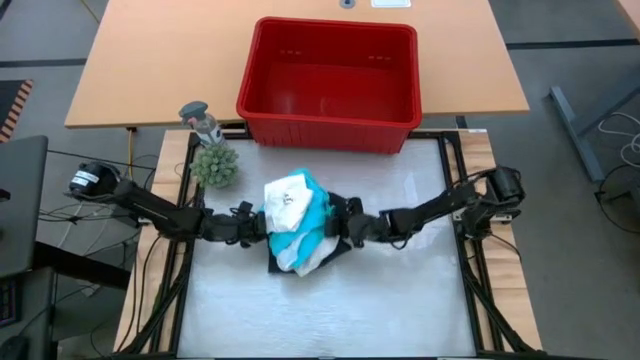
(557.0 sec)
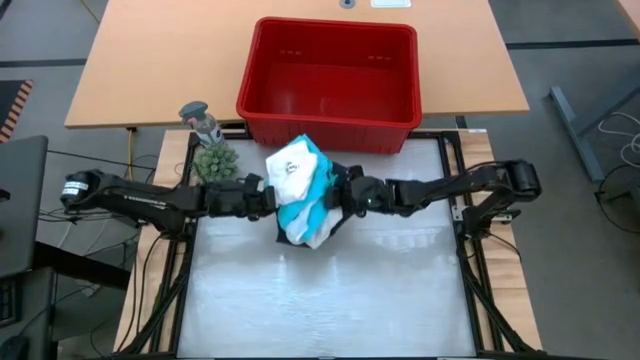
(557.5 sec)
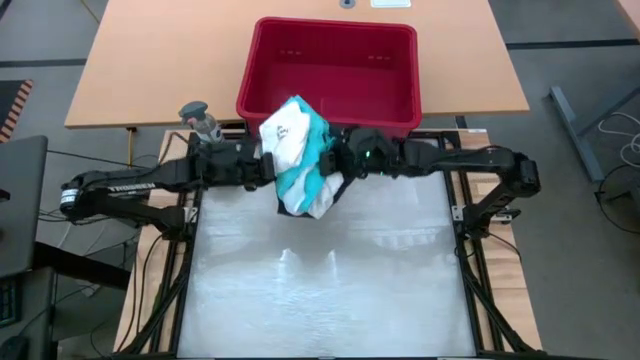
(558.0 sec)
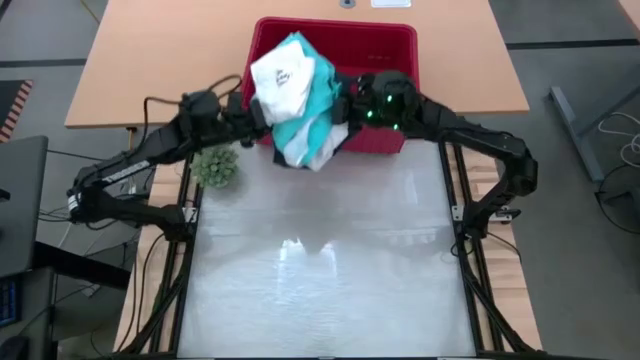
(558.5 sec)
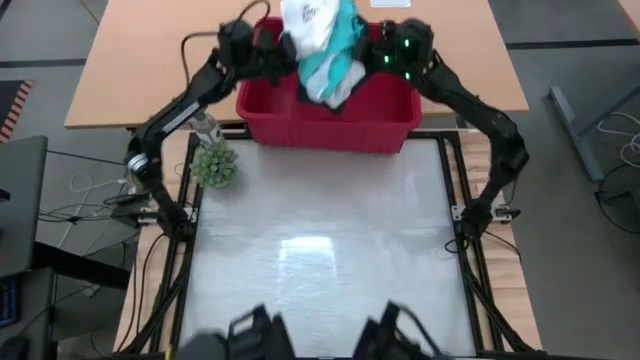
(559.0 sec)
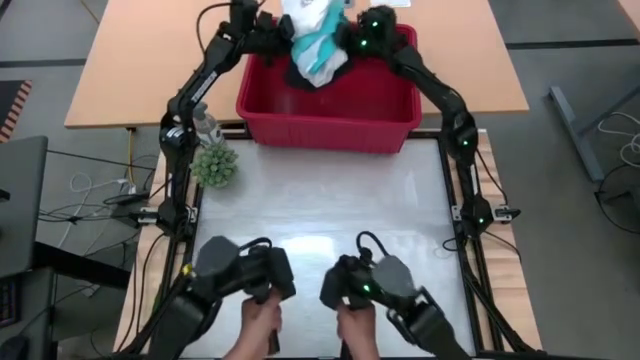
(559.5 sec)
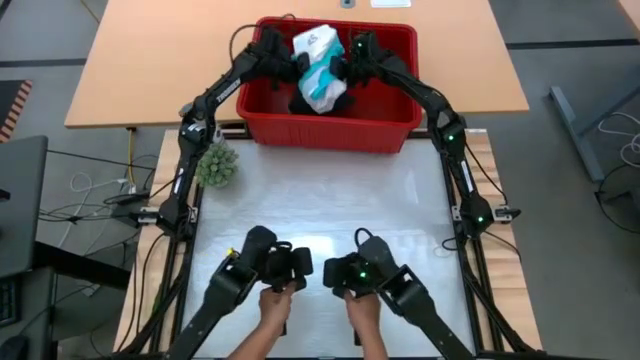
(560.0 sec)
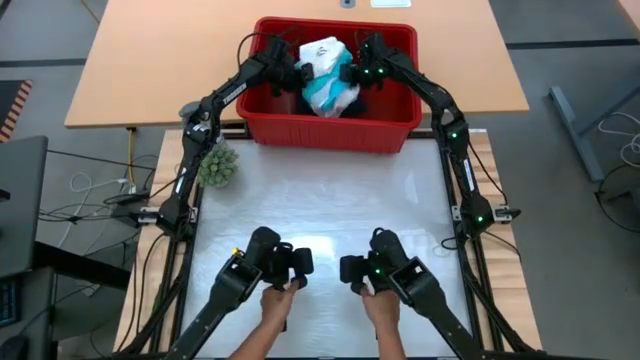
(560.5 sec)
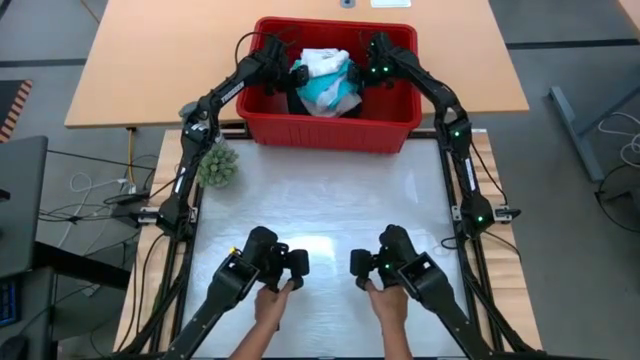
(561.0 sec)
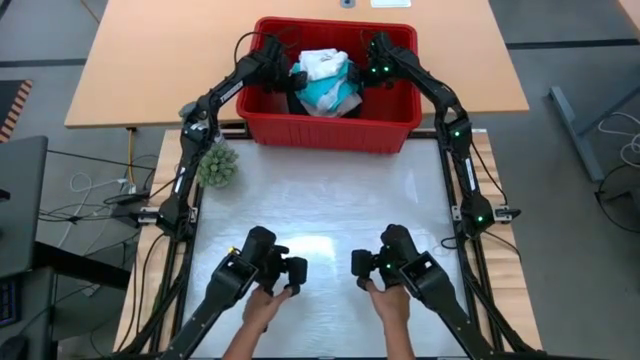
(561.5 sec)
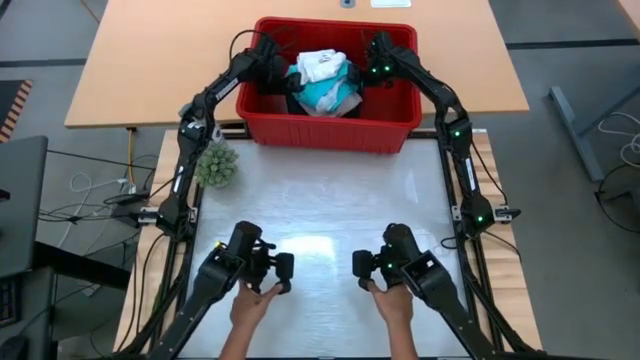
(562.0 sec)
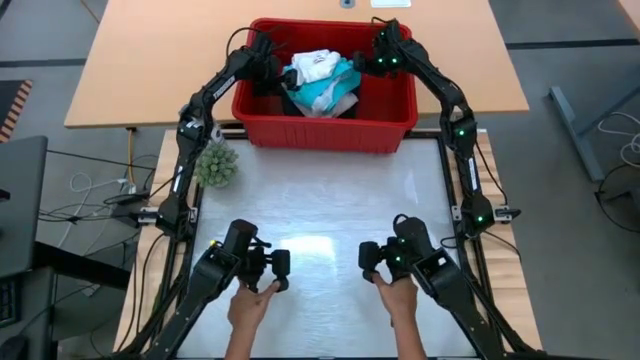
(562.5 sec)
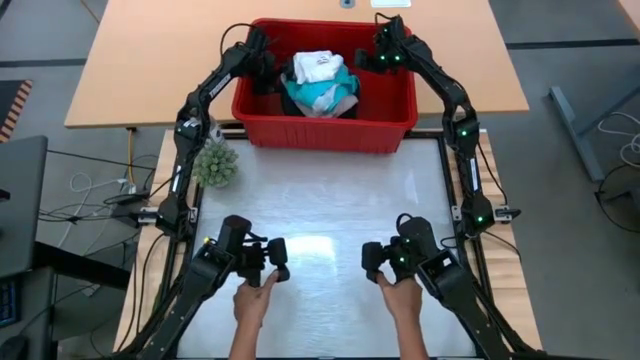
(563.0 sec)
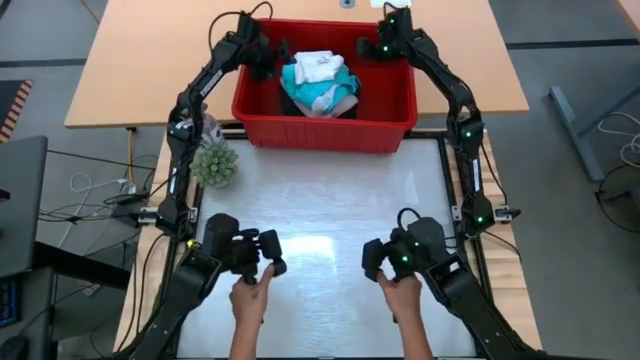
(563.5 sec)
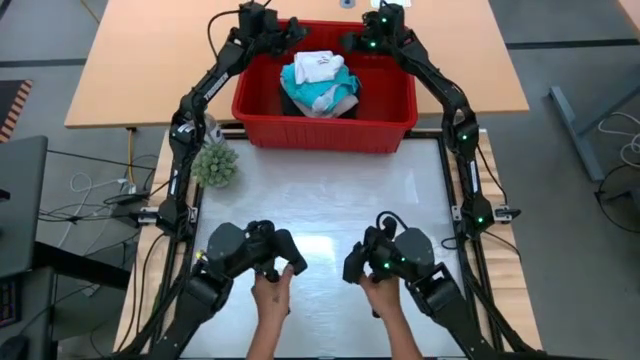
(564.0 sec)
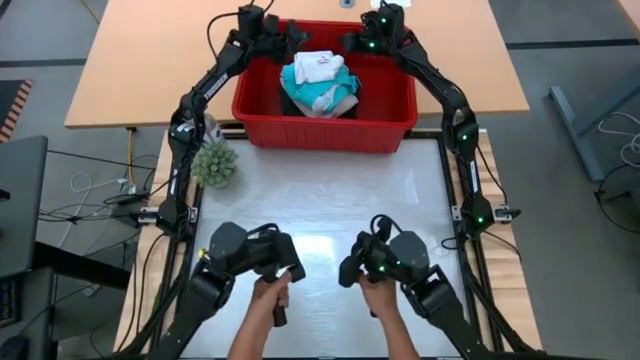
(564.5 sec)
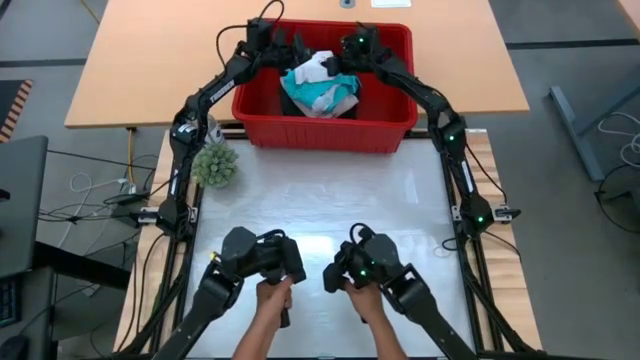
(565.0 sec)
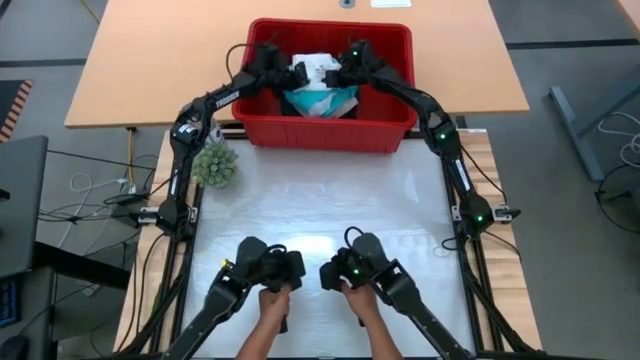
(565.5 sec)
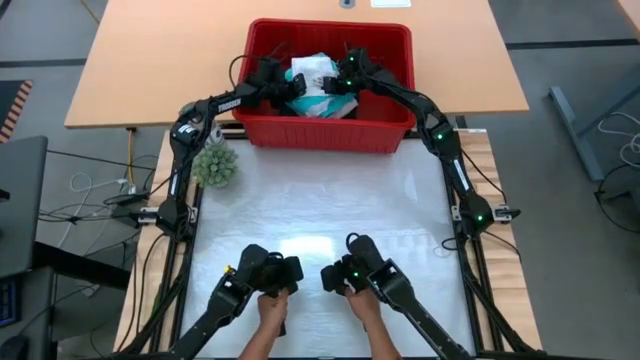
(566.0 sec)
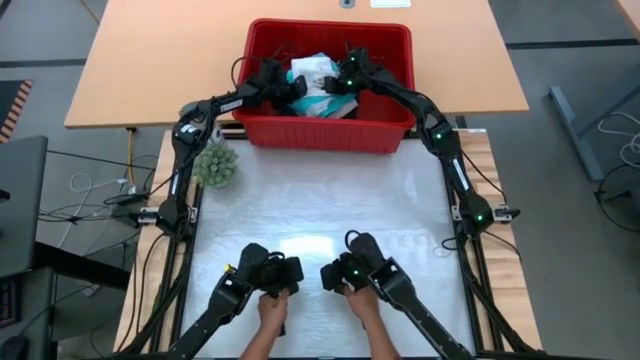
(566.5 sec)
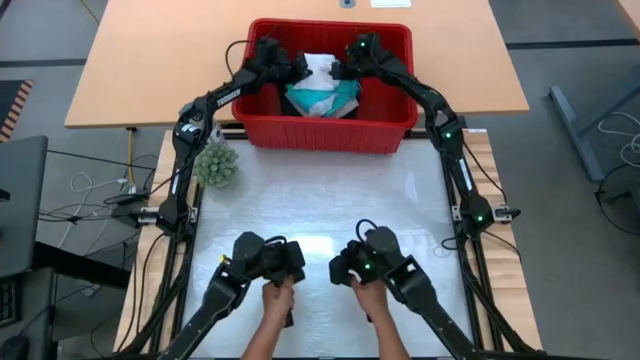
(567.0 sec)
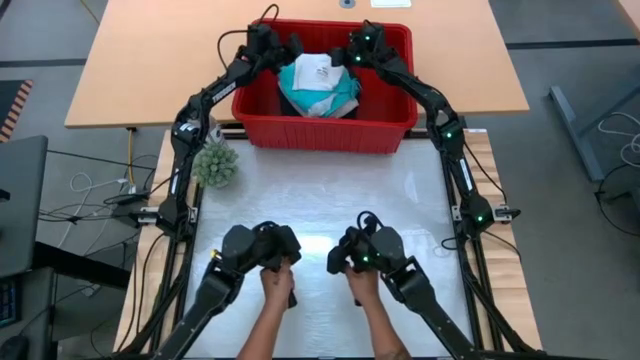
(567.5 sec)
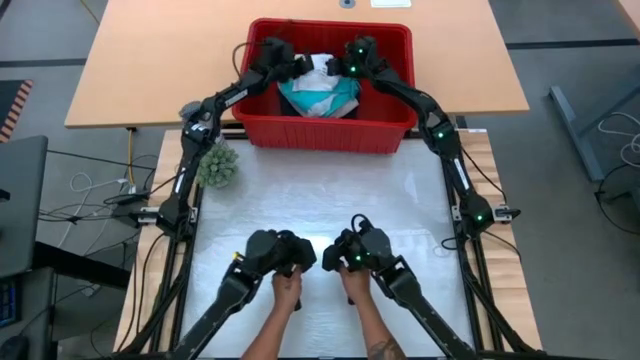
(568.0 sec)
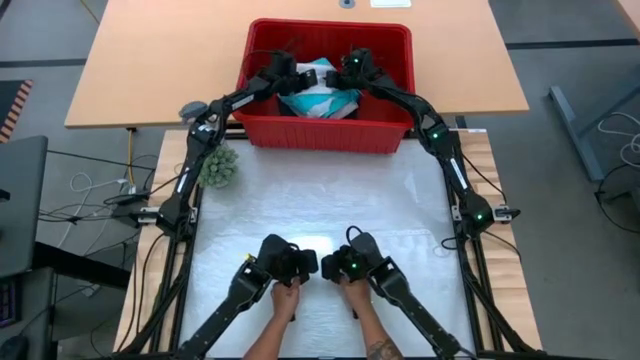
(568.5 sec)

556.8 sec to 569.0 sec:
Task: Fold Laundry from Bin
Put the stacked clothes into the red bin

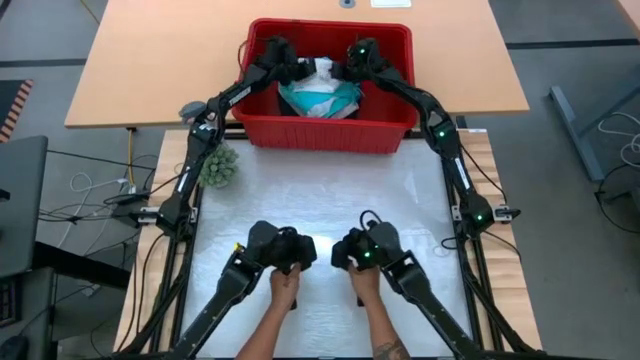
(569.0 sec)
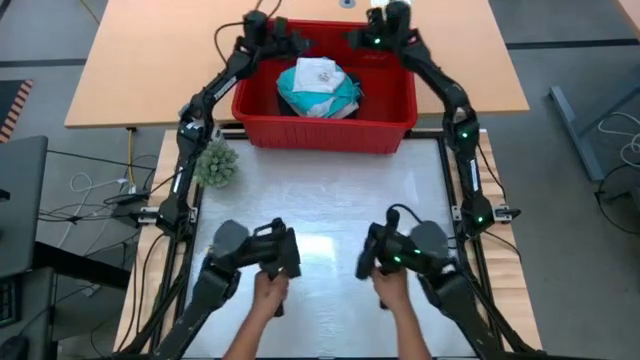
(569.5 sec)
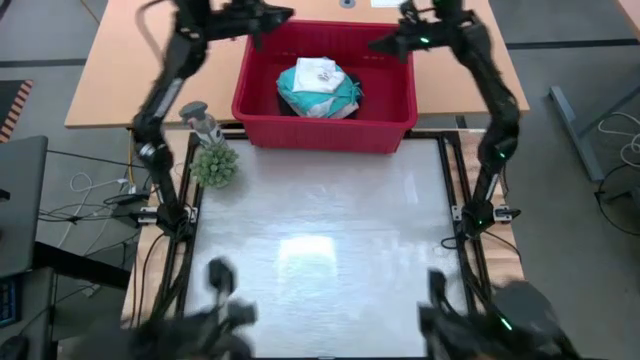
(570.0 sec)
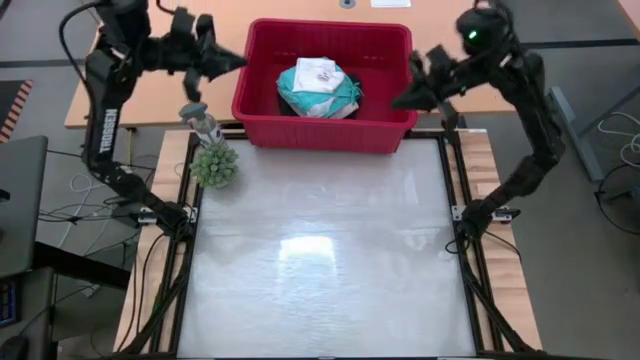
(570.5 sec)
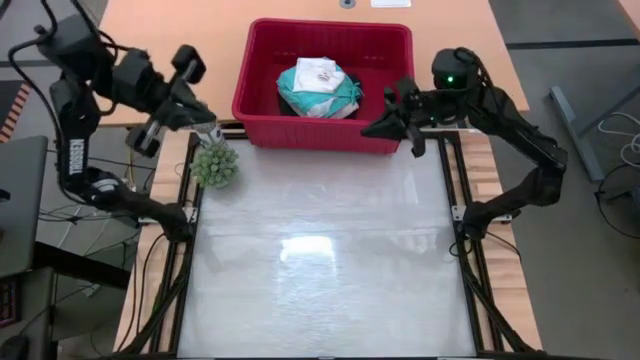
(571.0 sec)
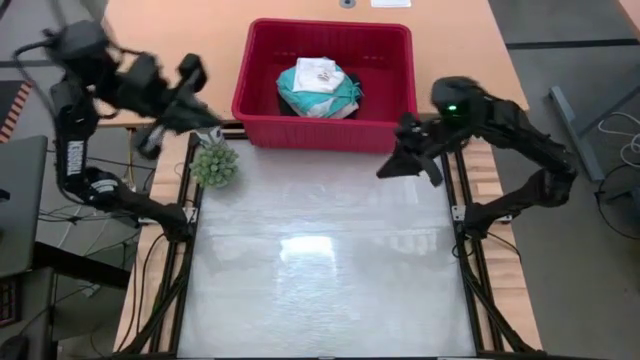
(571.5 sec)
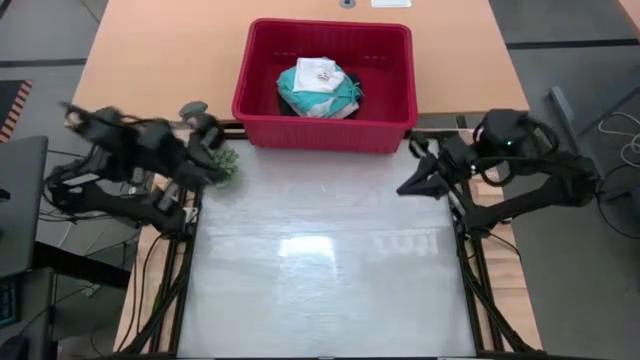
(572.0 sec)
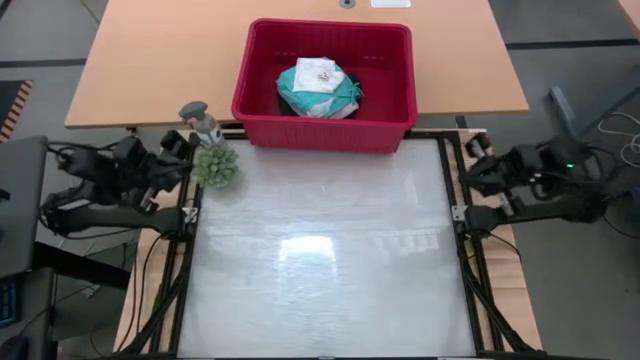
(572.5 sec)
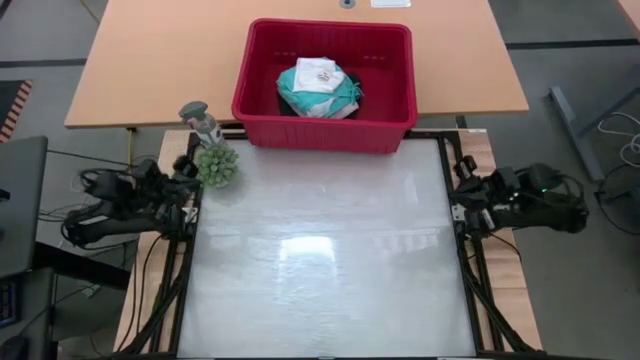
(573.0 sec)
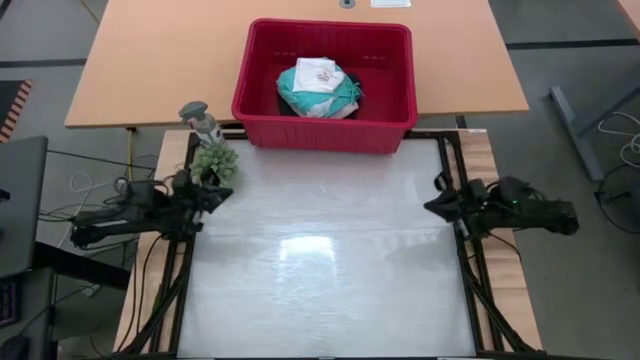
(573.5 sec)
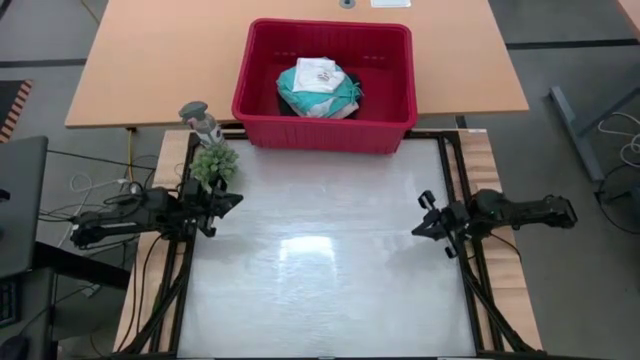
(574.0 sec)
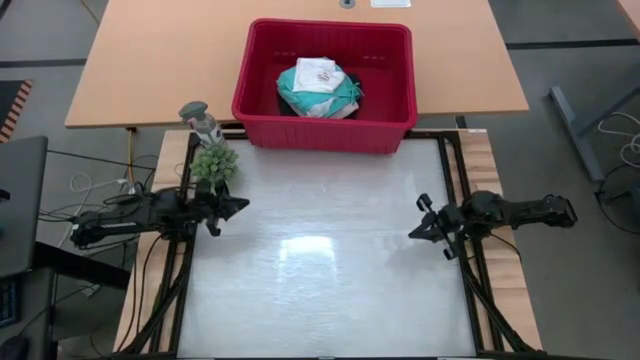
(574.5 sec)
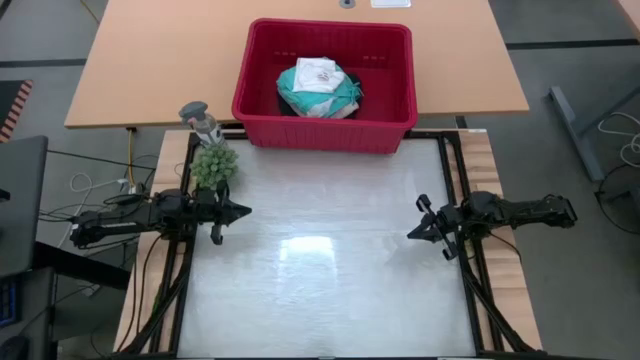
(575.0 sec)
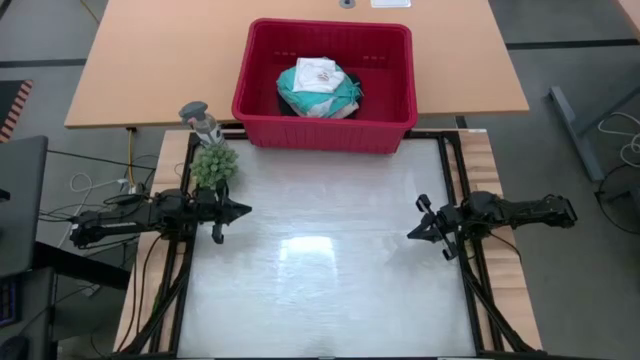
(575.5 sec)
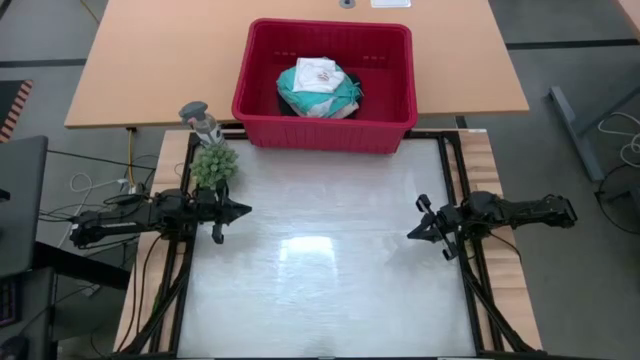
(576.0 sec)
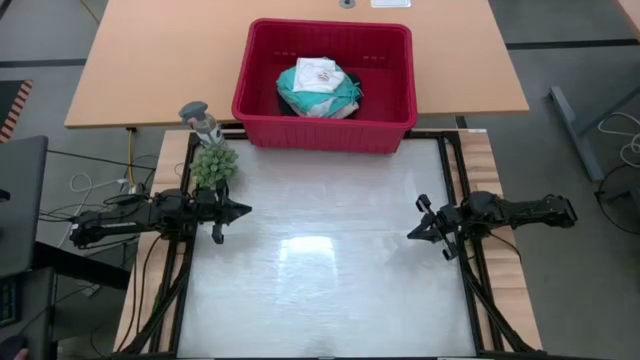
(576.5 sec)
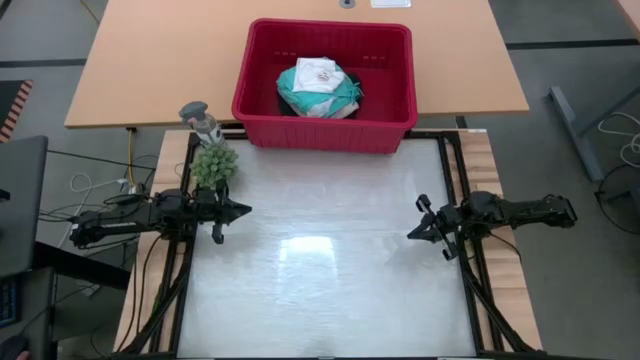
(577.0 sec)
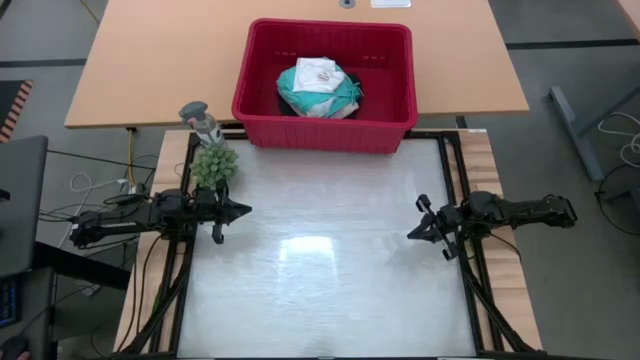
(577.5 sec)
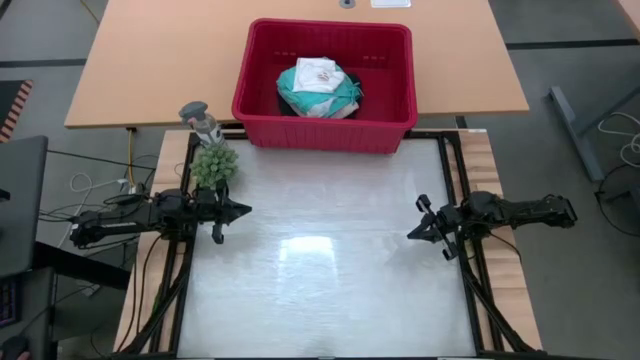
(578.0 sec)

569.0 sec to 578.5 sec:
Return to Home Position
